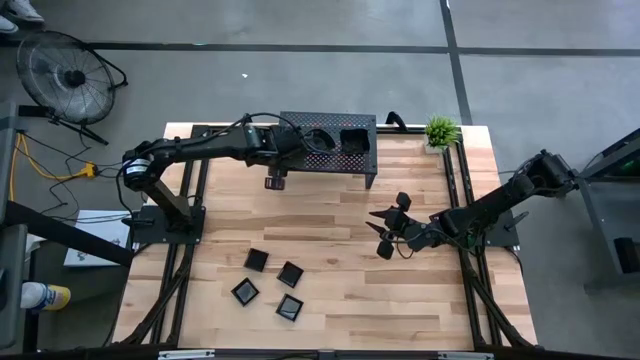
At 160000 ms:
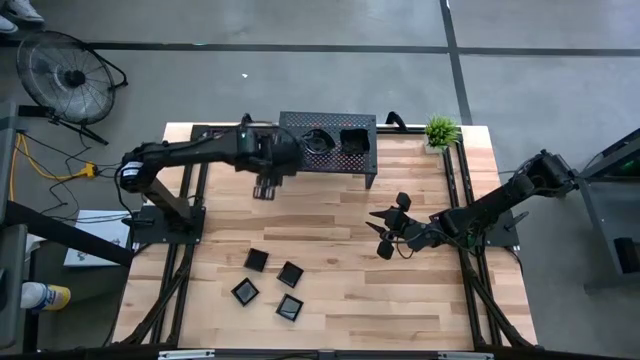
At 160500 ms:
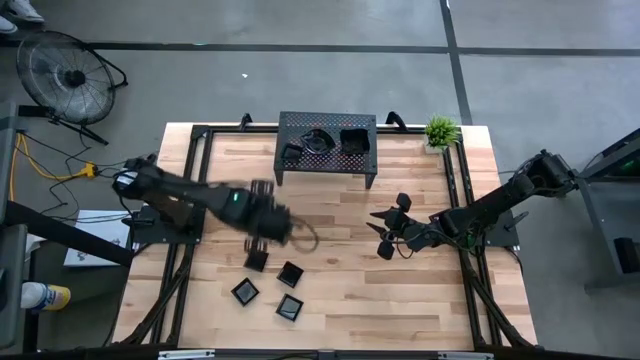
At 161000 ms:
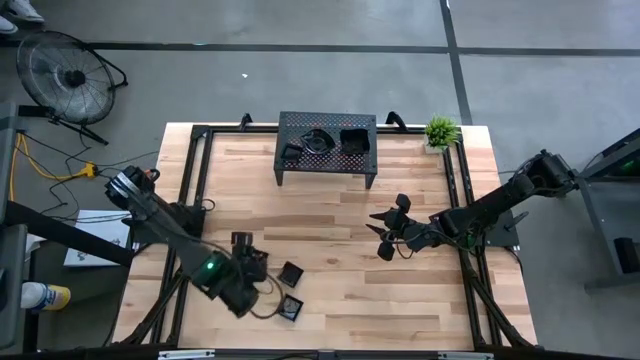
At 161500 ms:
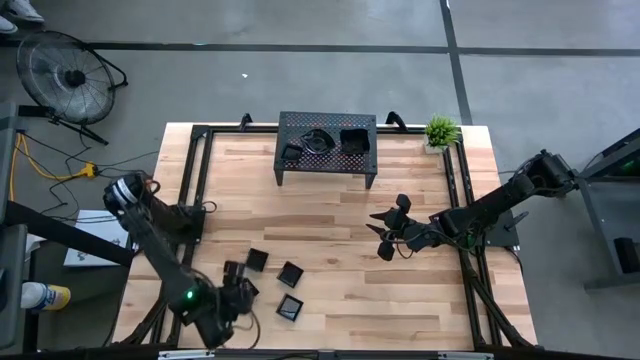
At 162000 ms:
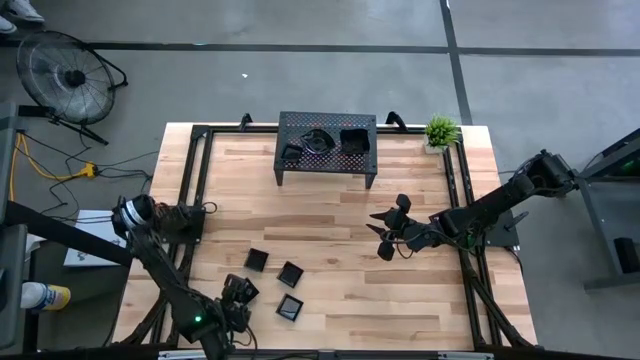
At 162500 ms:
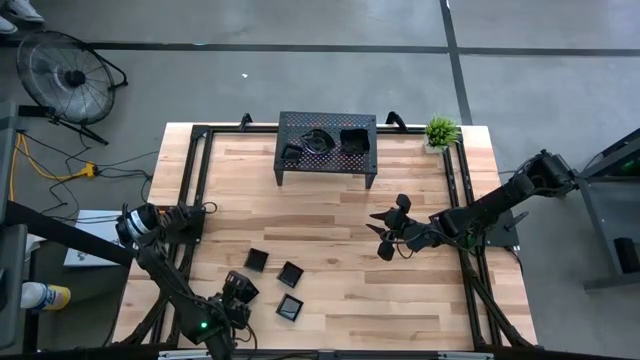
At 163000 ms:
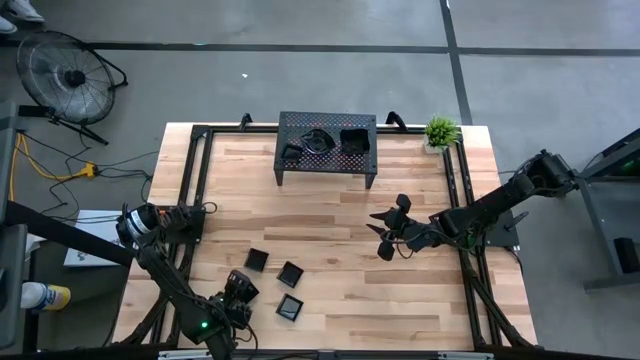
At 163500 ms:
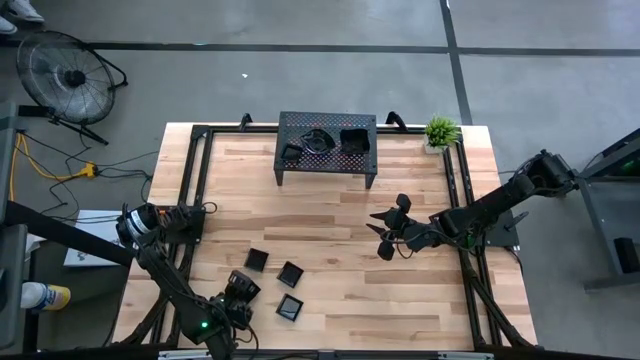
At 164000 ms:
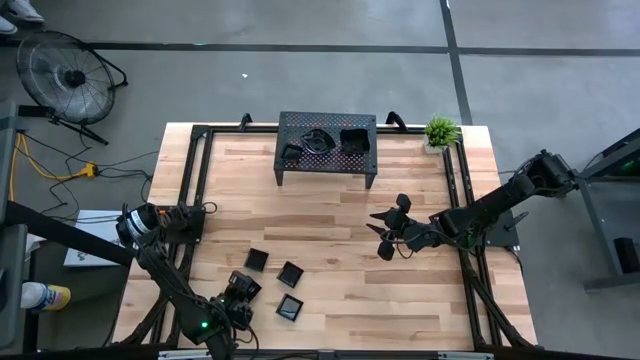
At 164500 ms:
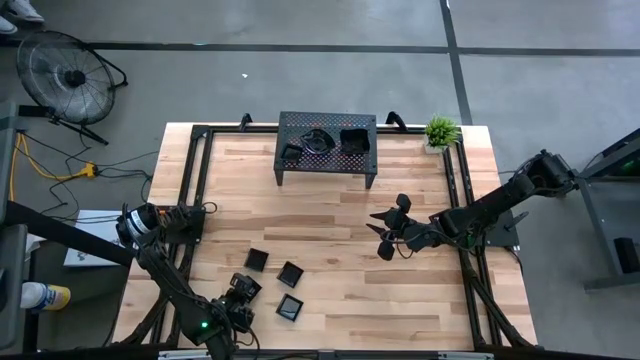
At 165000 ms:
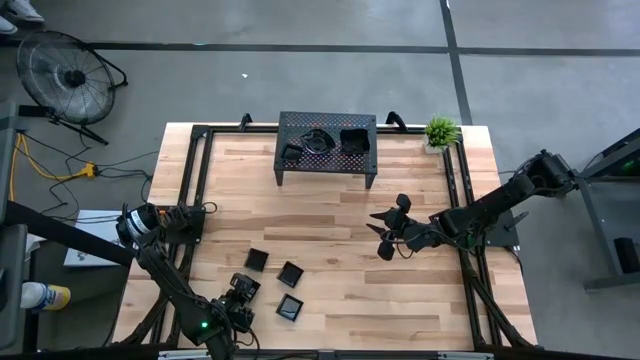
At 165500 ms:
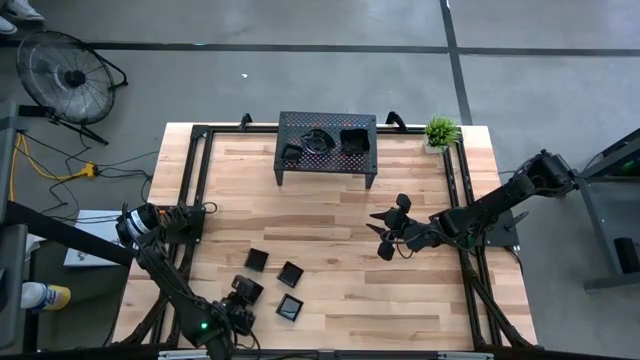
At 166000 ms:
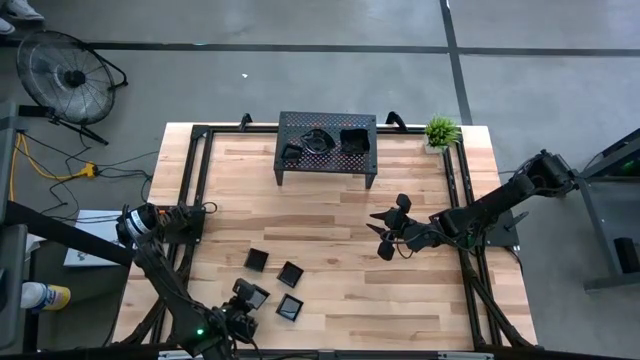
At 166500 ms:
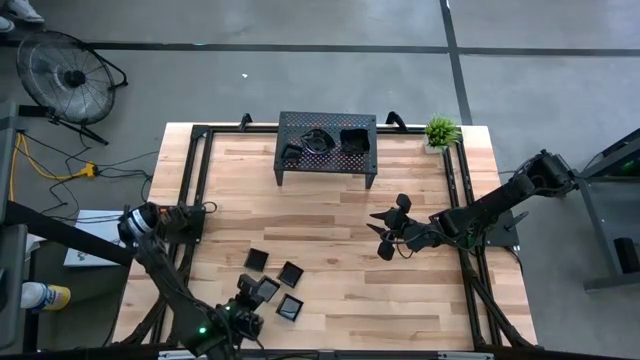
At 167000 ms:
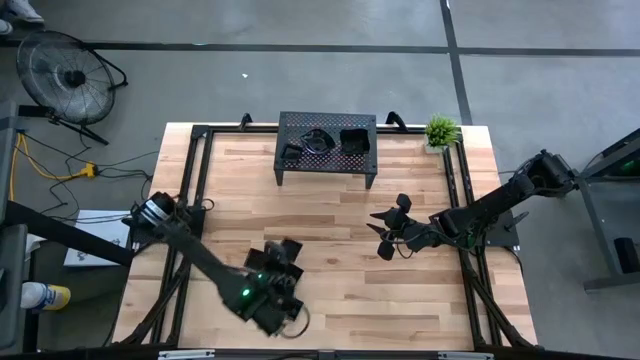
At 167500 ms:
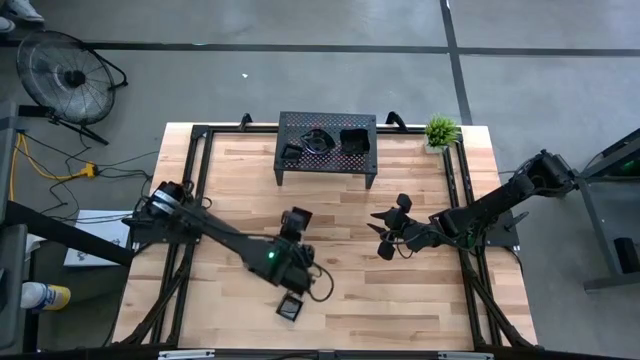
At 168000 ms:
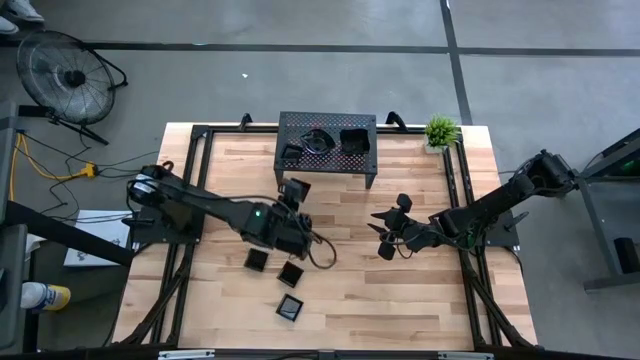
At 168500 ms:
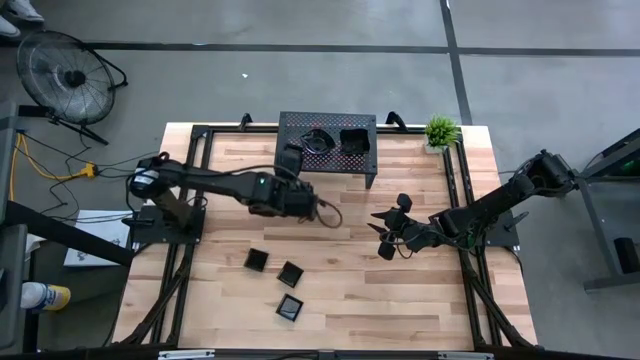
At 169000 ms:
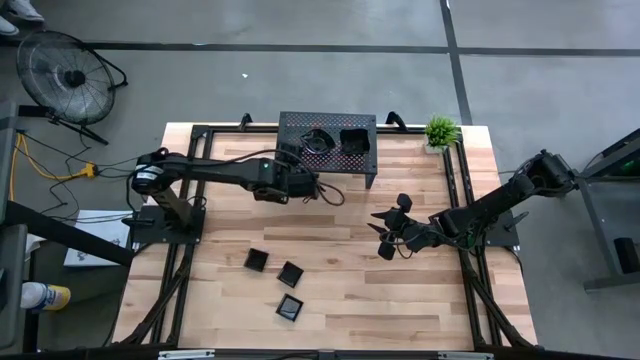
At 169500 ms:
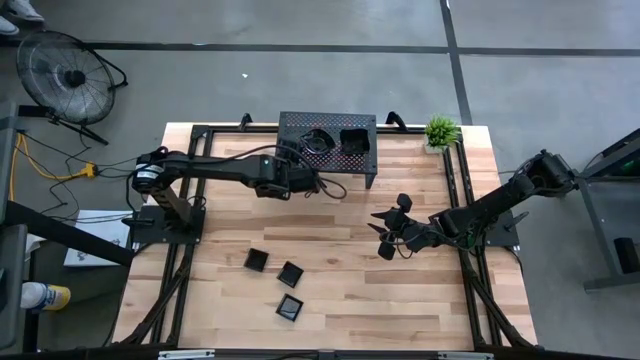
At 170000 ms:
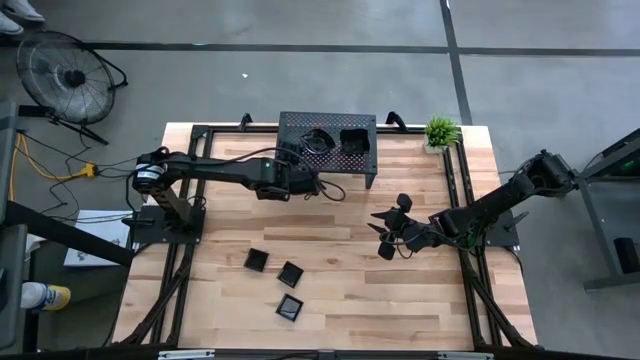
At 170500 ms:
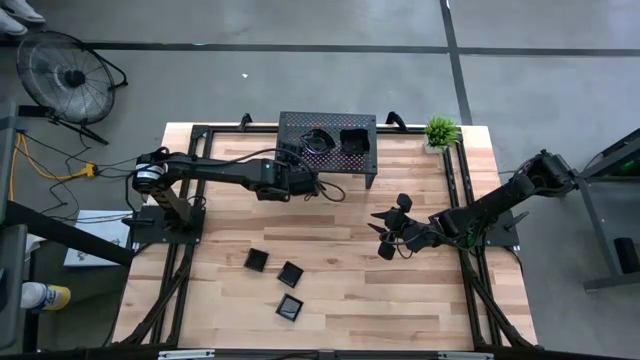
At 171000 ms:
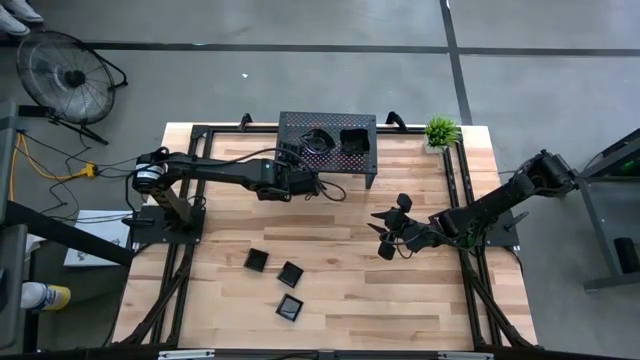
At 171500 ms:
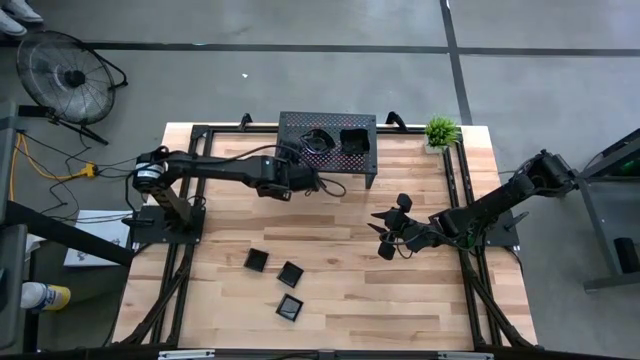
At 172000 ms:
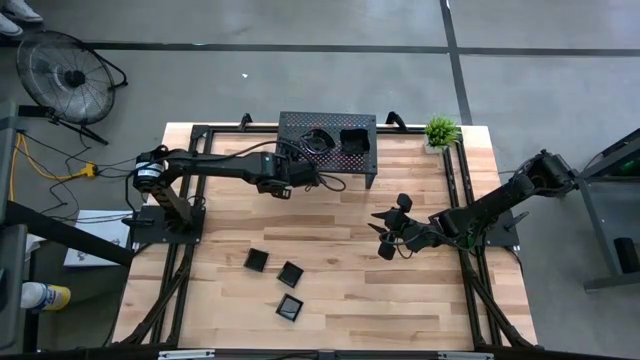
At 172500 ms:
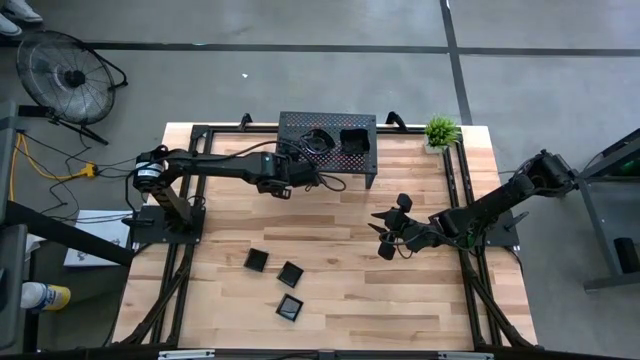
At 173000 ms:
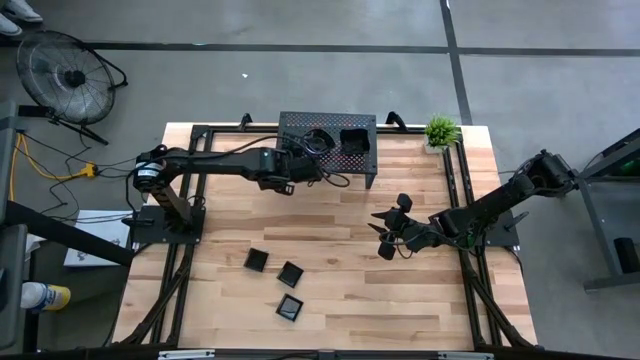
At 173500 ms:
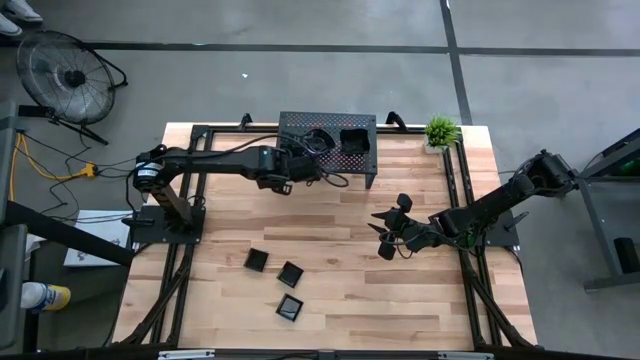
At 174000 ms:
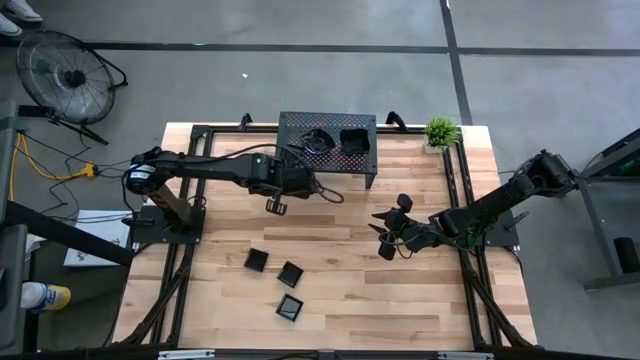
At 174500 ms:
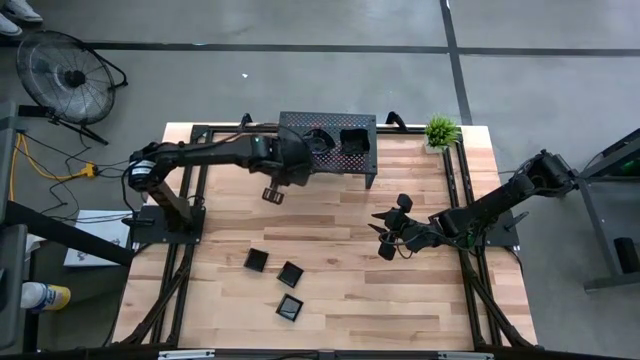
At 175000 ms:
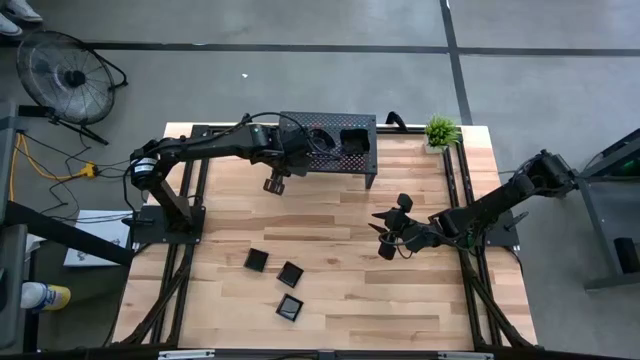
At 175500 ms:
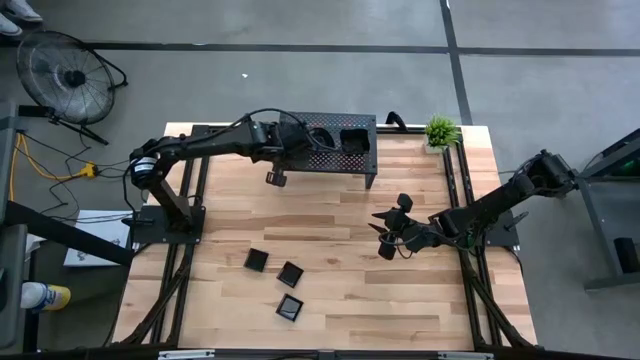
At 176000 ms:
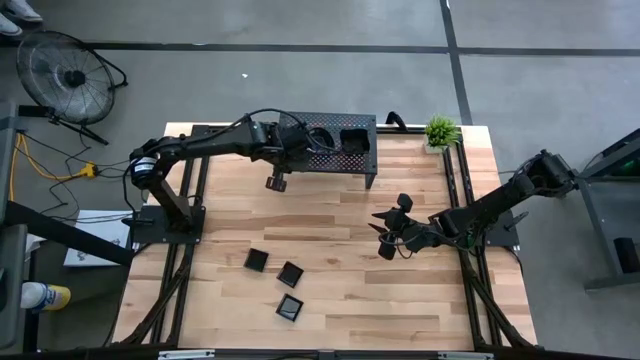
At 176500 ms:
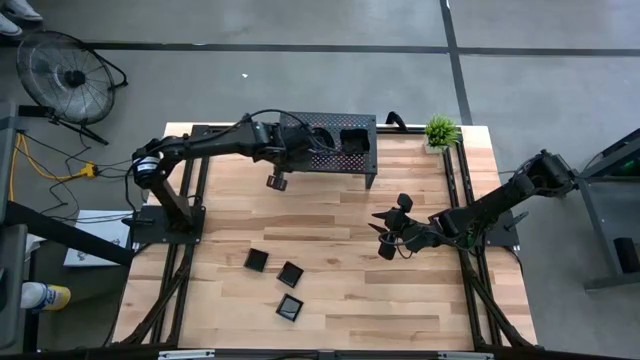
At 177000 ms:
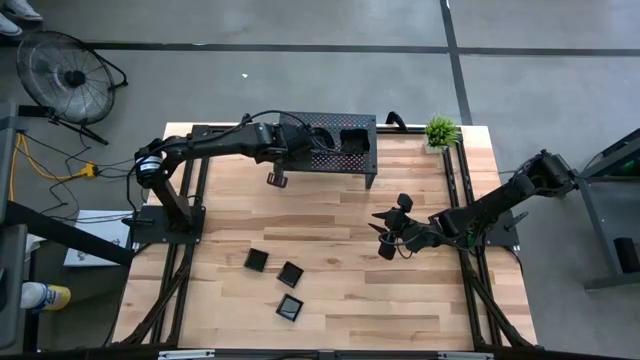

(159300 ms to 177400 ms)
Task: Pick & Place Mini shaped plates
Stack the black square plate on top of the black square plate on the shelf

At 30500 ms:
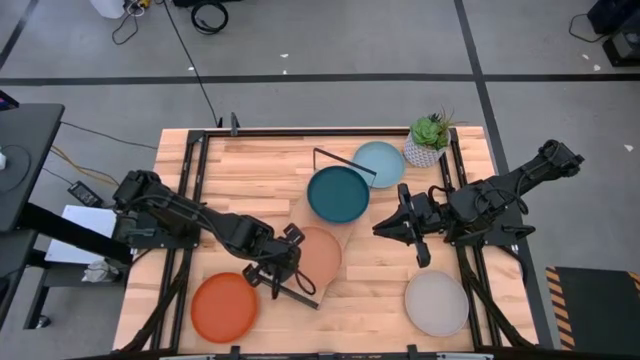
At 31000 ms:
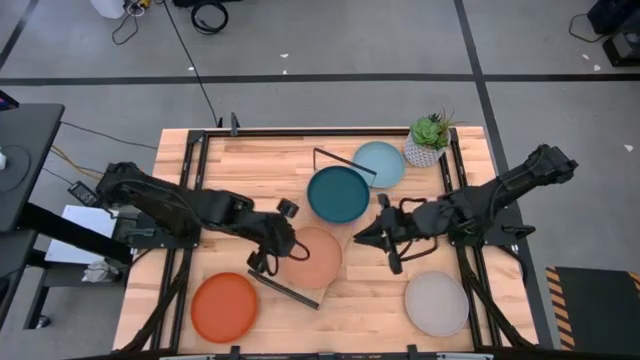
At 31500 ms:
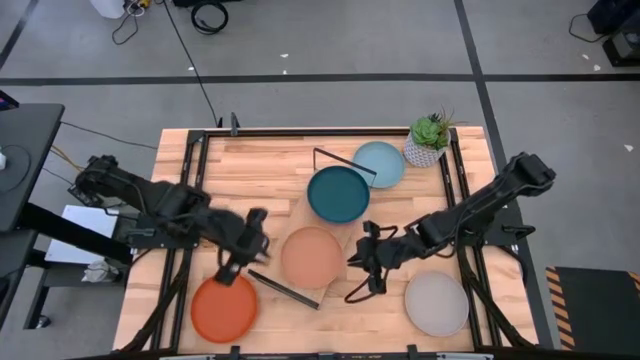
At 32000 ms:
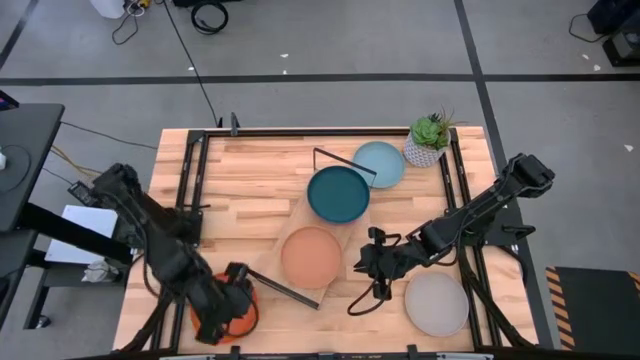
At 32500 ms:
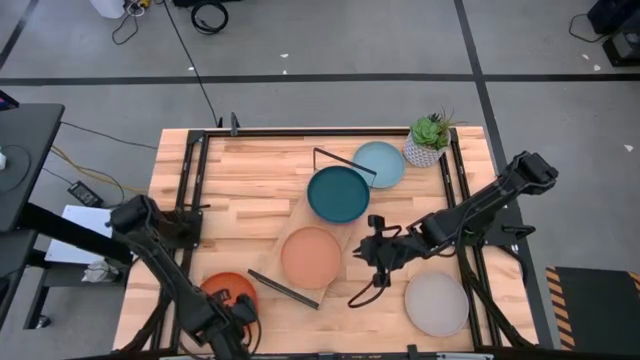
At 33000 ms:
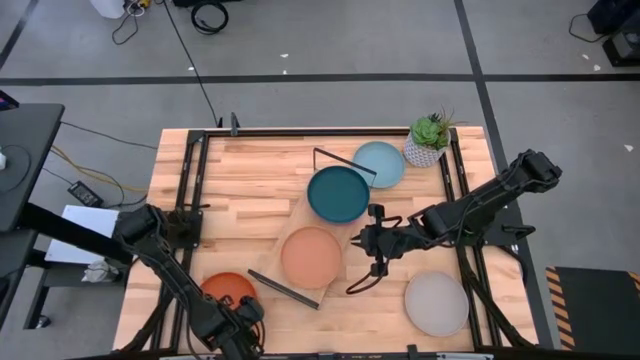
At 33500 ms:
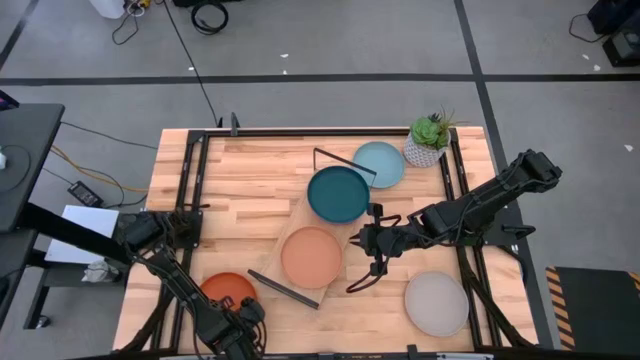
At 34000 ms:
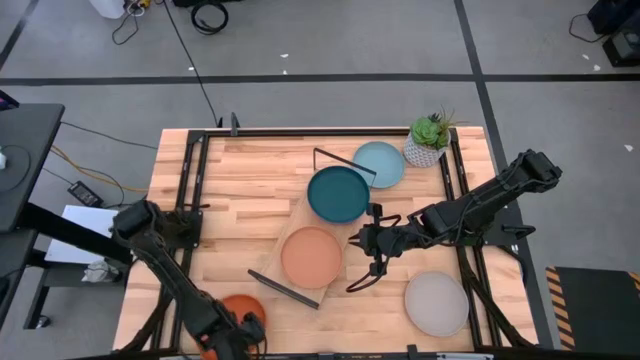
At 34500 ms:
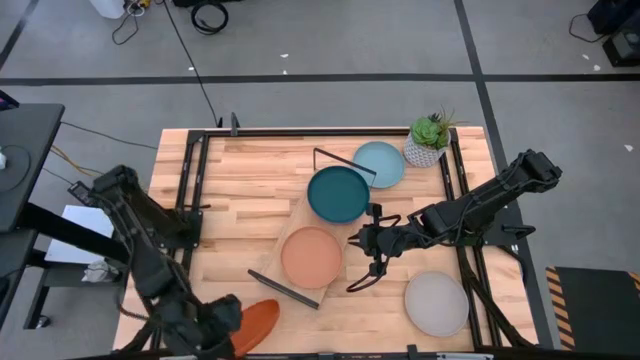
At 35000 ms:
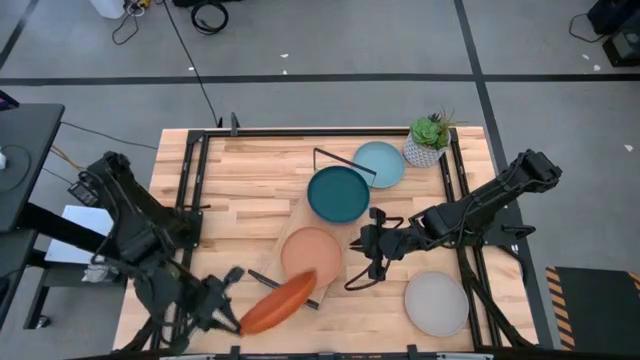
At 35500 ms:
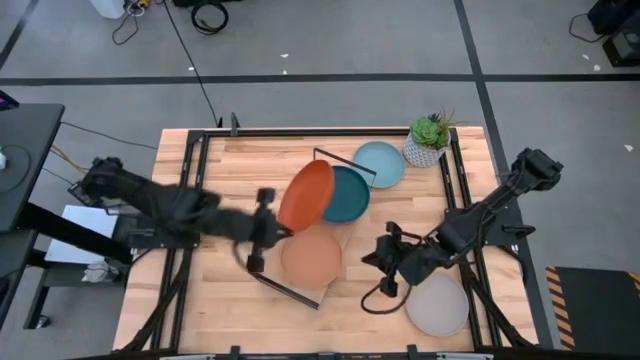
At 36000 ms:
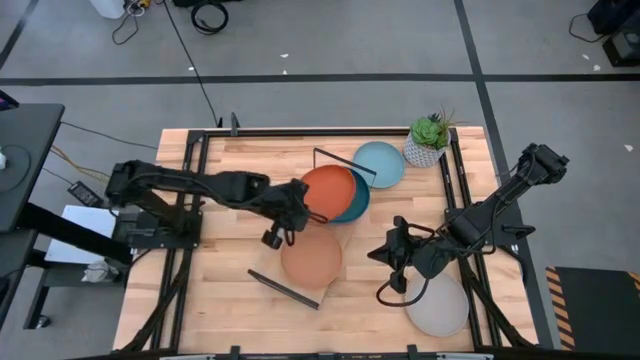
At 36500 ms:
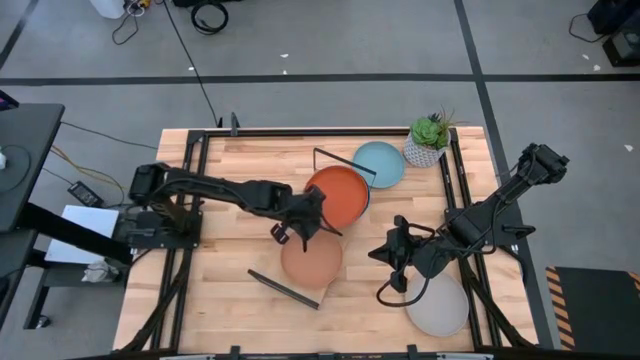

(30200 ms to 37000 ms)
Task: Place and stack plates onto a shelf
Stack the orange plate on top of the dark blue plate on the shelf
